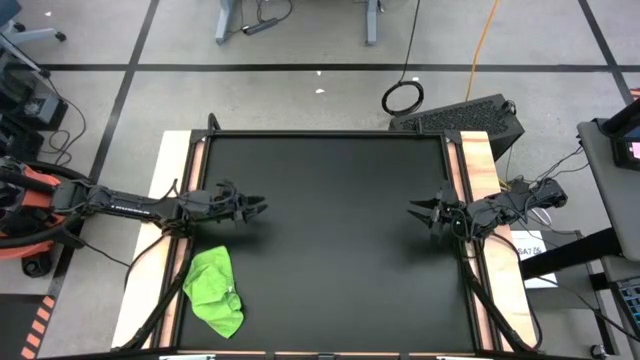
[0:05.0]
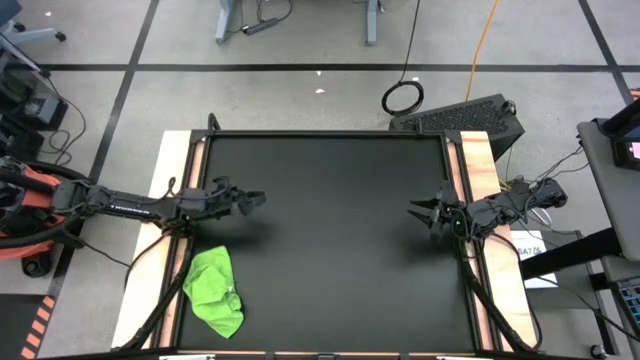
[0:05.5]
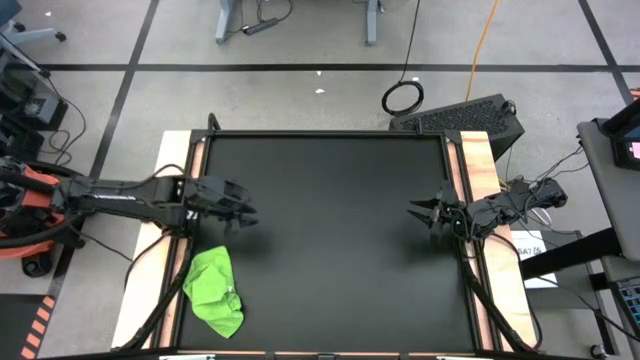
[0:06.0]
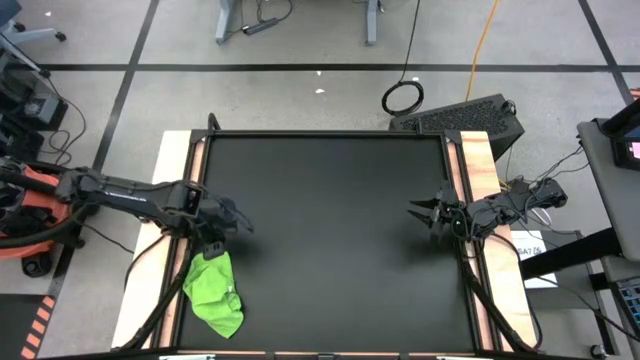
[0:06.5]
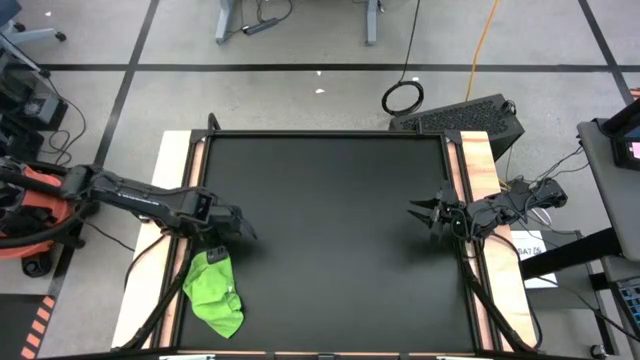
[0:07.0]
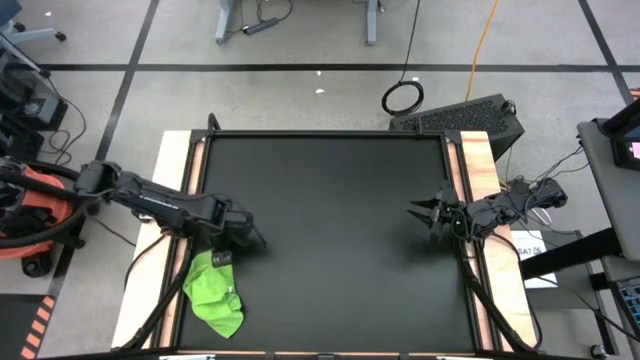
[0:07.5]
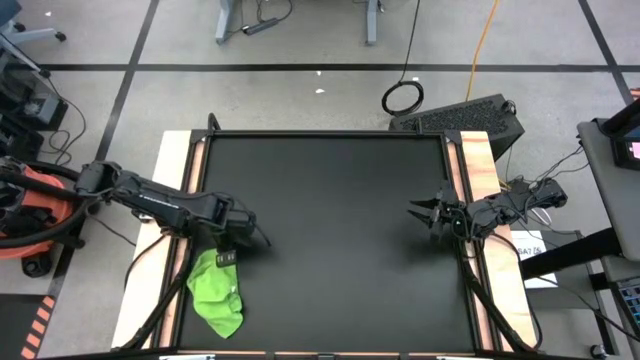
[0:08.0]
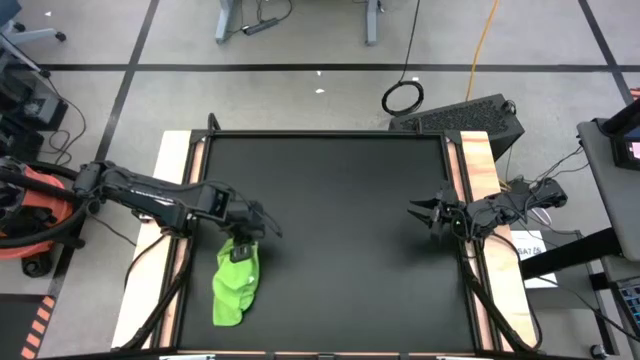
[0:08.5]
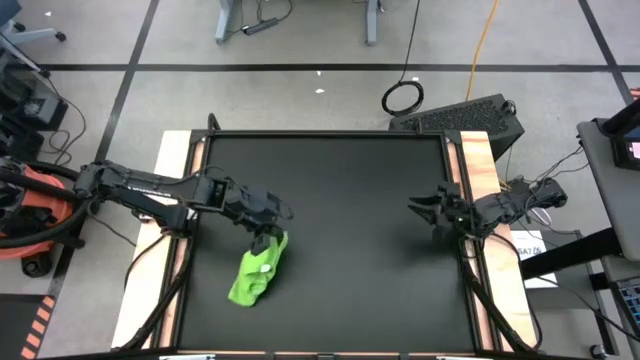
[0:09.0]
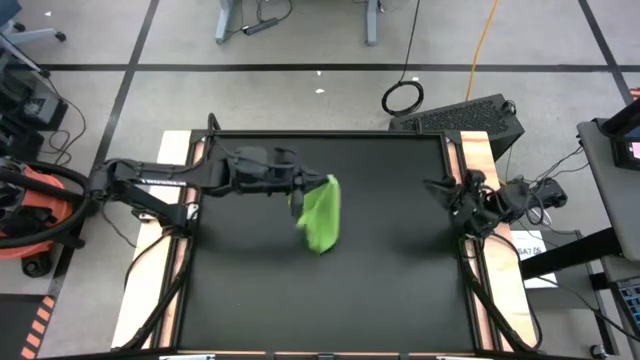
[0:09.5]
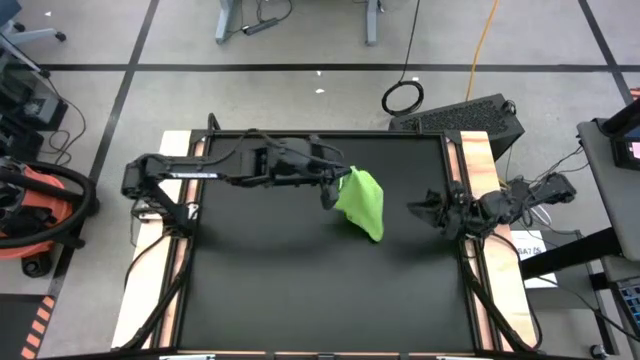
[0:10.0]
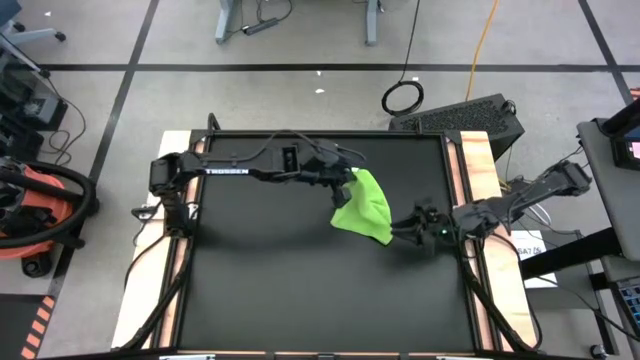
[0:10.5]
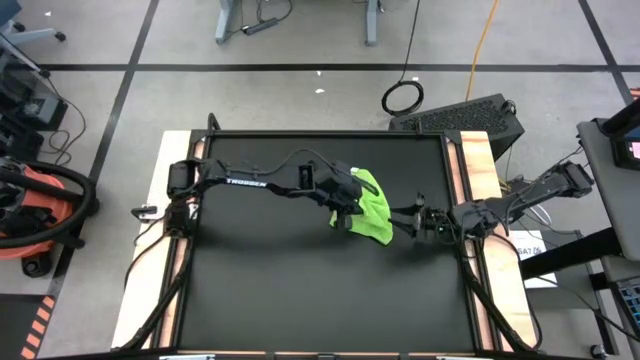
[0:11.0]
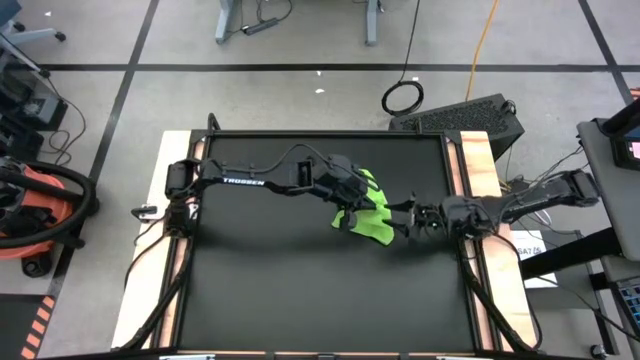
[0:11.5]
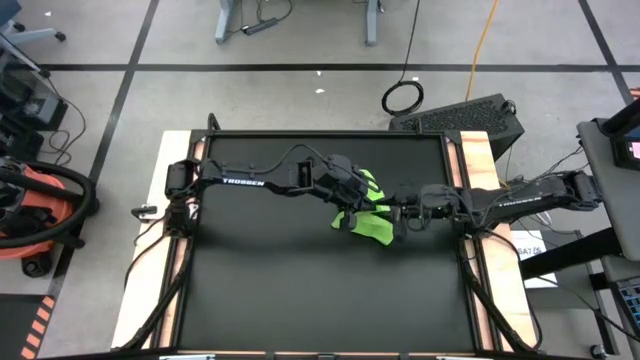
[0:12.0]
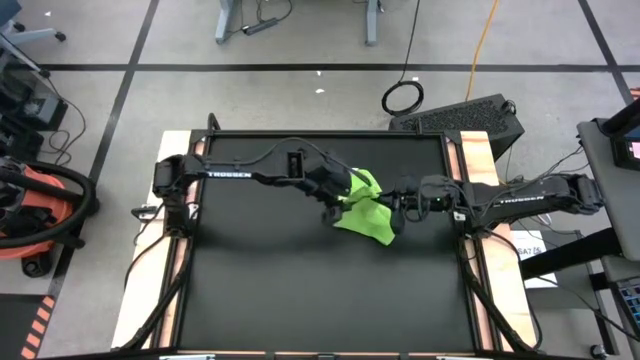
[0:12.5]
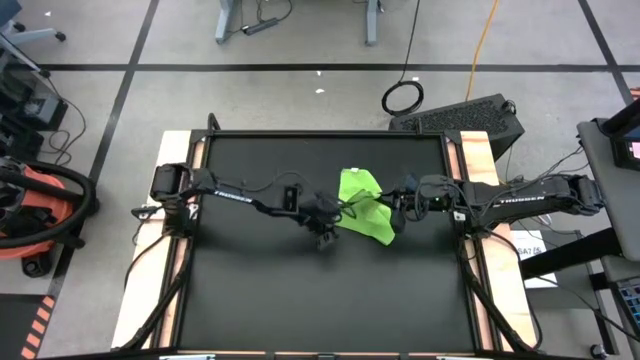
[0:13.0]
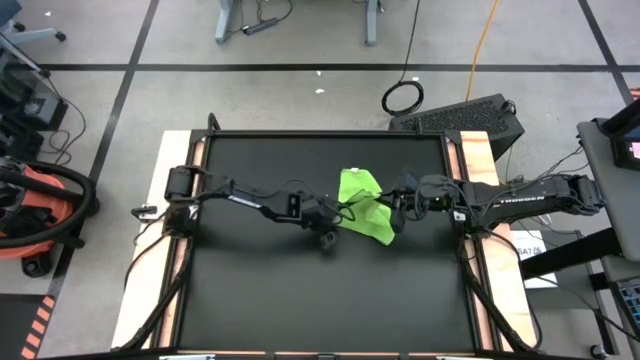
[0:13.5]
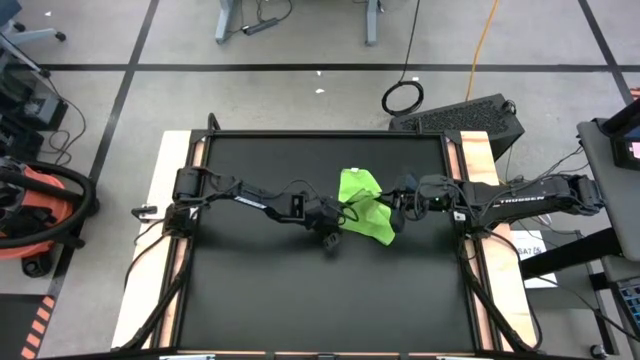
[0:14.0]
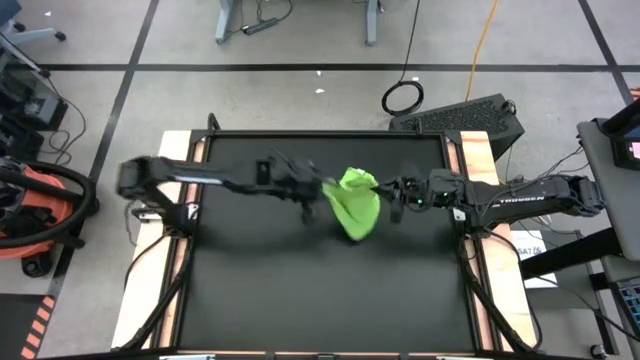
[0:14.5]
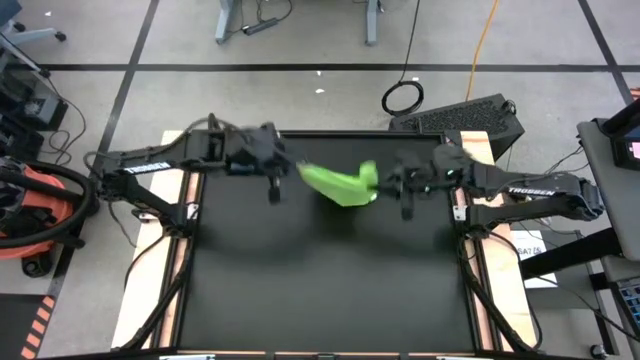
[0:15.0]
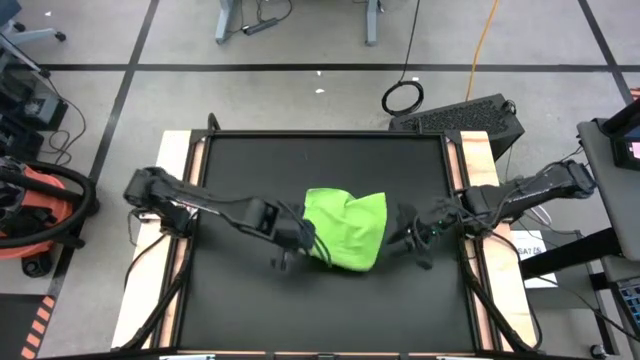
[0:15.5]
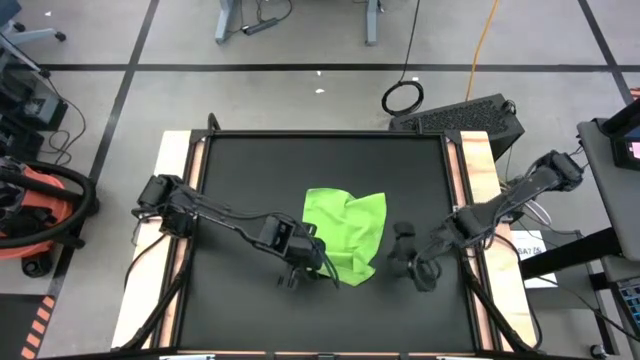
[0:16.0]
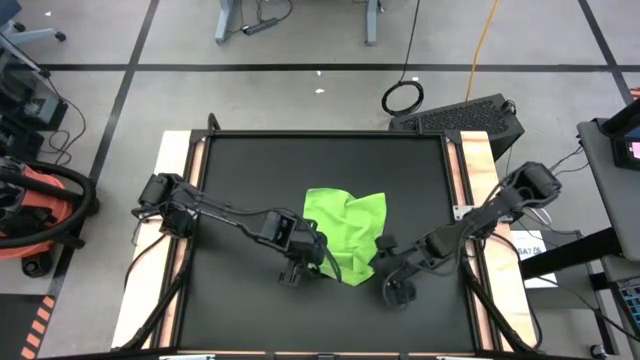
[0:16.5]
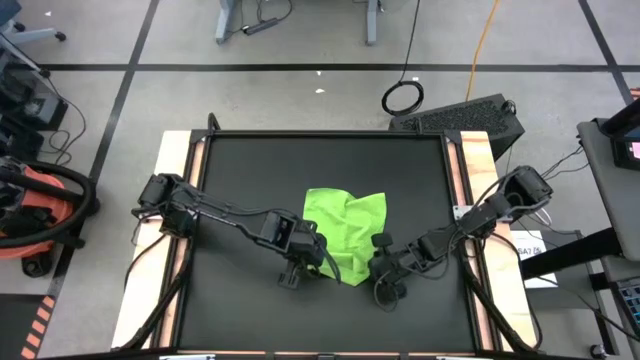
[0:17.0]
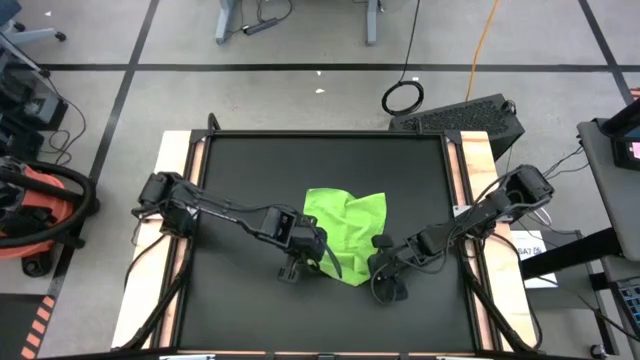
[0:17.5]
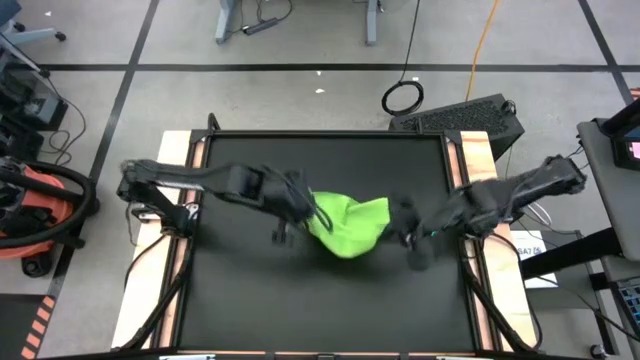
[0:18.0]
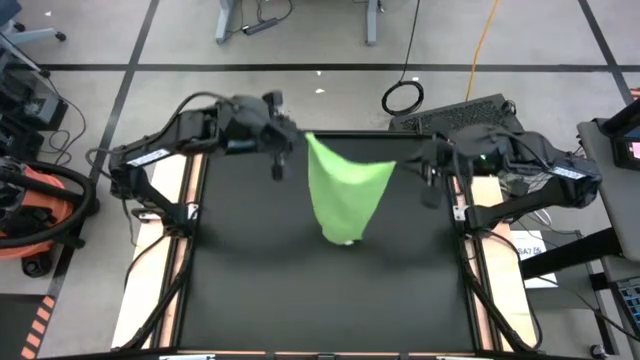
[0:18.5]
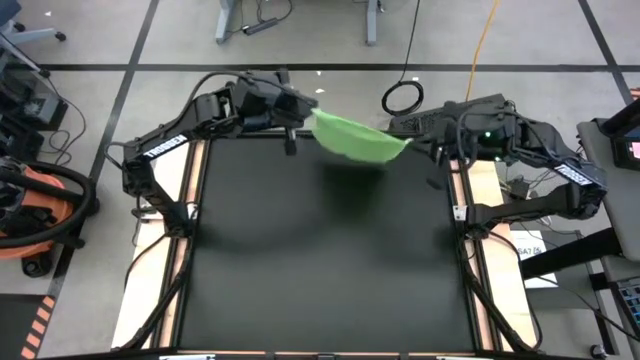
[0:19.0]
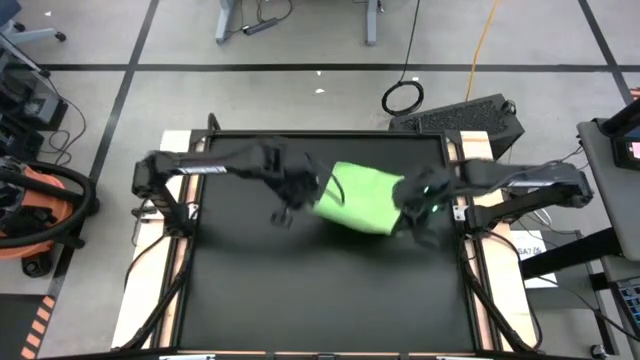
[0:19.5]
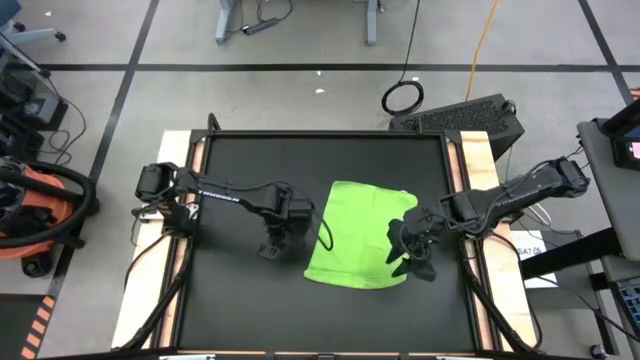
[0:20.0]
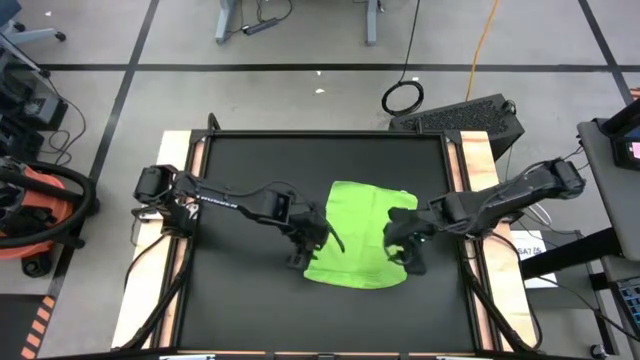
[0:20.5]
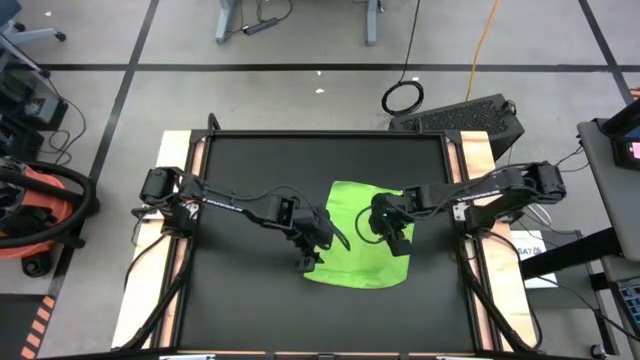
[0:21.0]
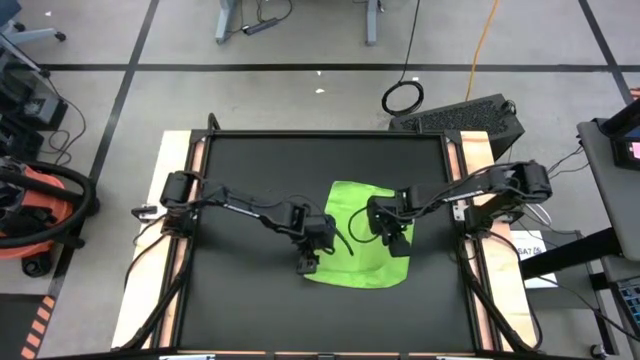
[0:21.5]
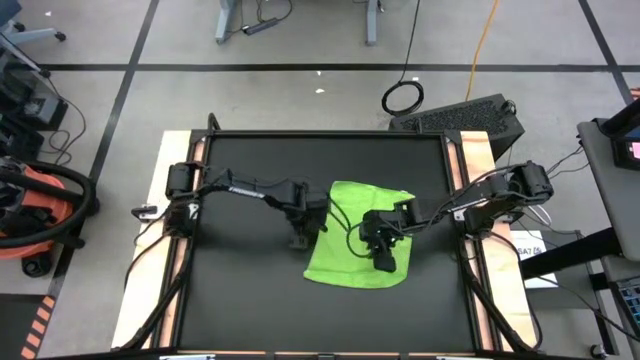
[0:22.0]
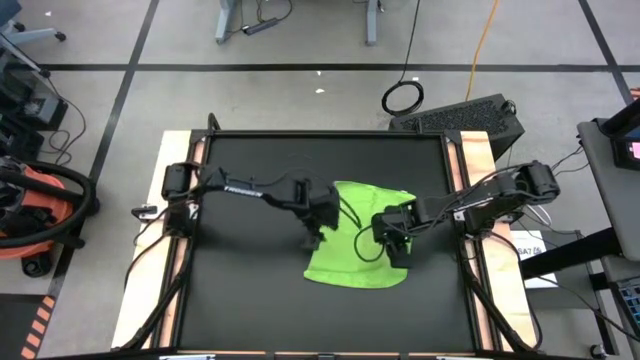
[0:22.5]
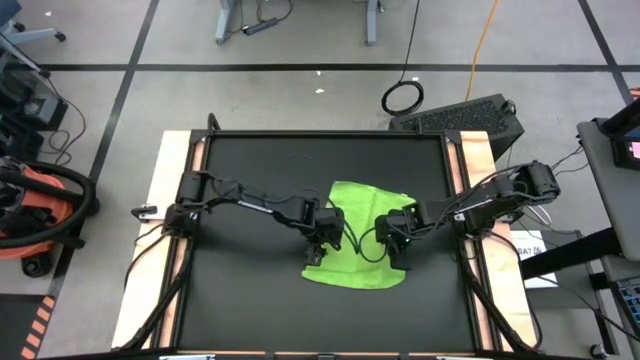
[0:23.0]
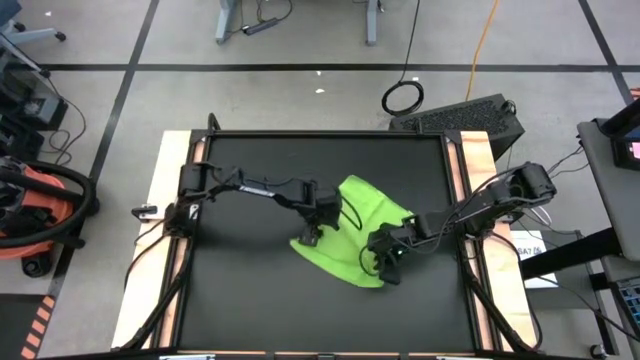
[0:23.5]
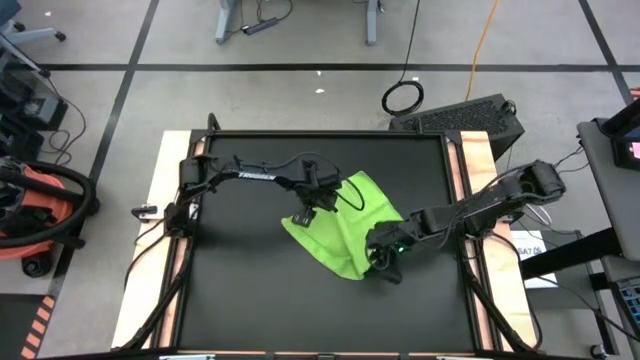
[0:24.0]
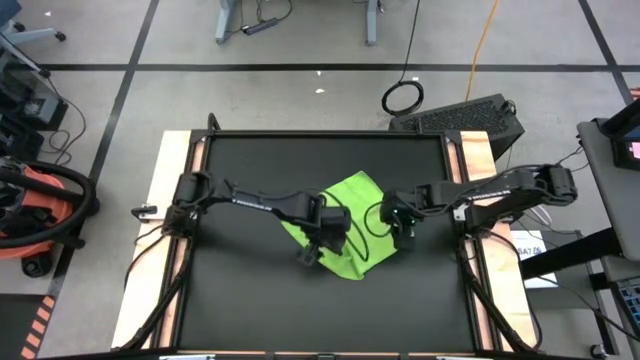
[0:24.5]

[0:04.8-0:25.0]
Task: Roll towel
Roll the green towel
